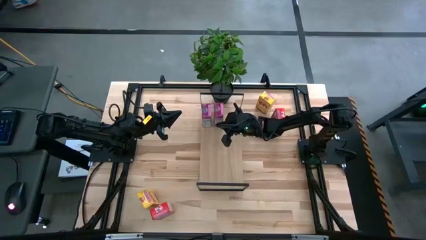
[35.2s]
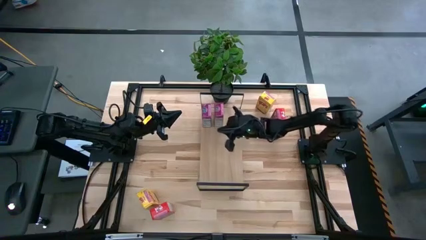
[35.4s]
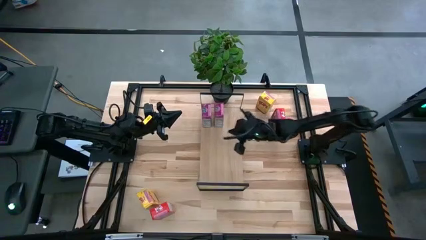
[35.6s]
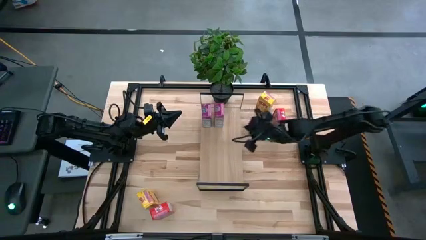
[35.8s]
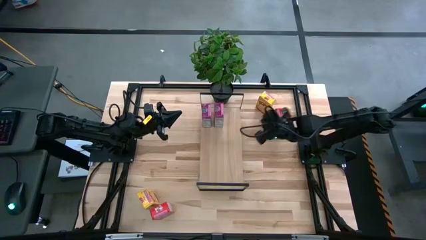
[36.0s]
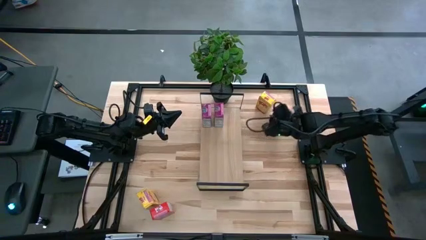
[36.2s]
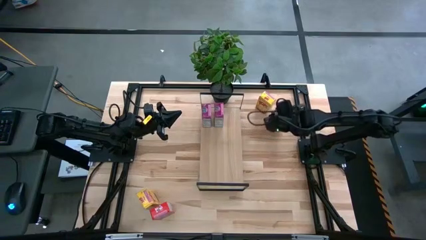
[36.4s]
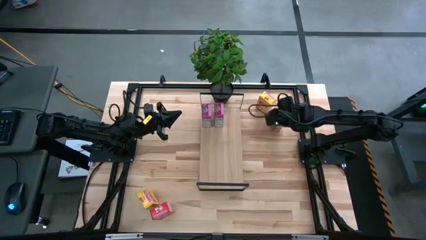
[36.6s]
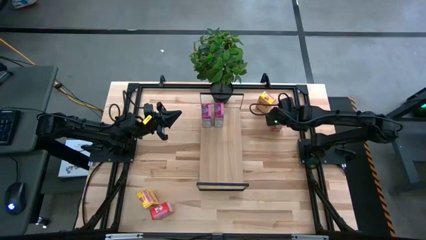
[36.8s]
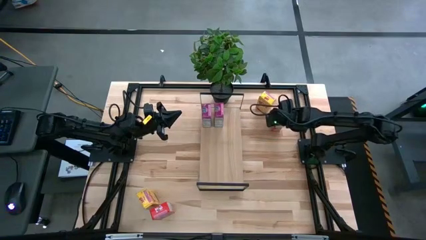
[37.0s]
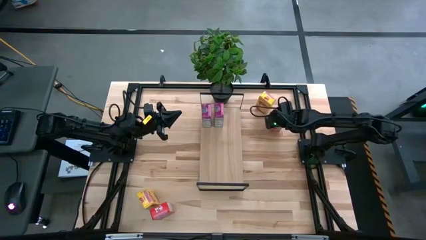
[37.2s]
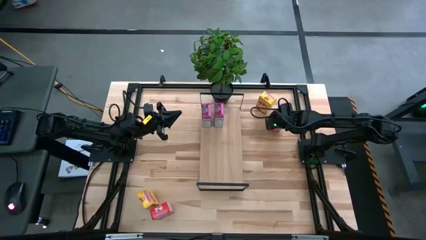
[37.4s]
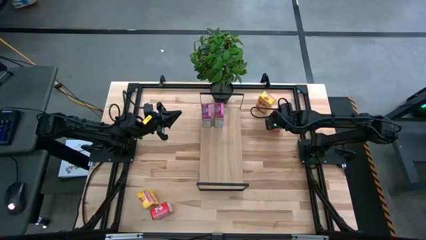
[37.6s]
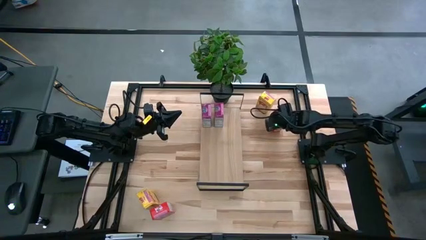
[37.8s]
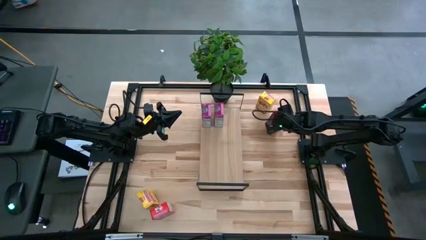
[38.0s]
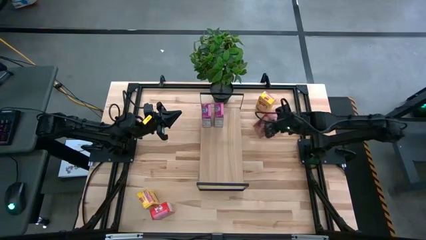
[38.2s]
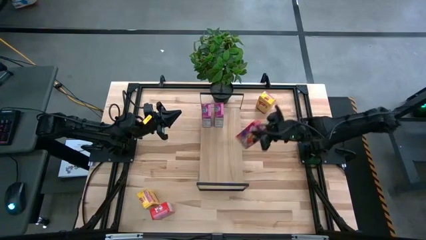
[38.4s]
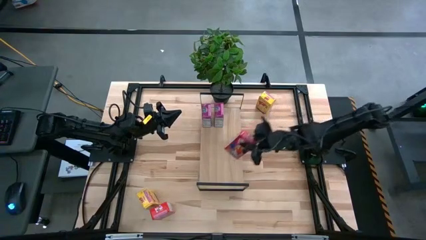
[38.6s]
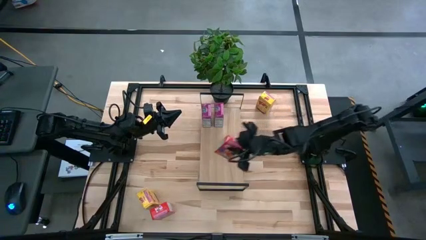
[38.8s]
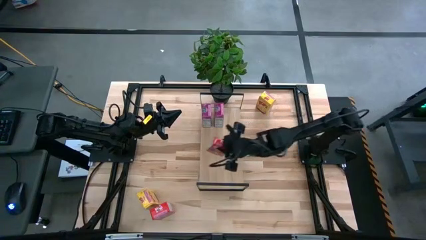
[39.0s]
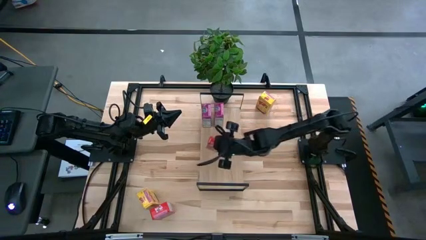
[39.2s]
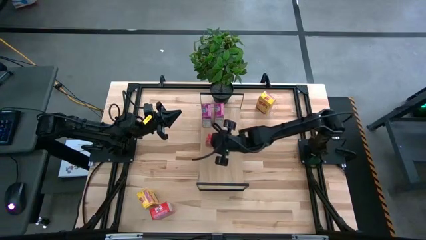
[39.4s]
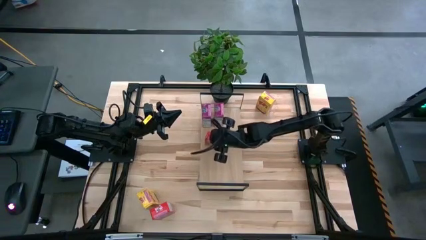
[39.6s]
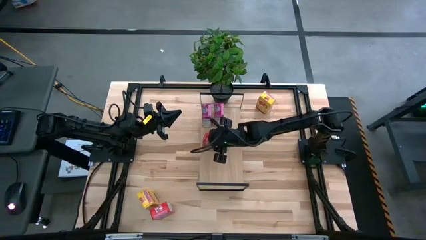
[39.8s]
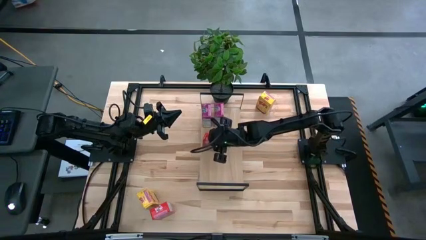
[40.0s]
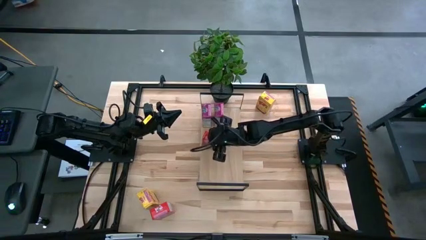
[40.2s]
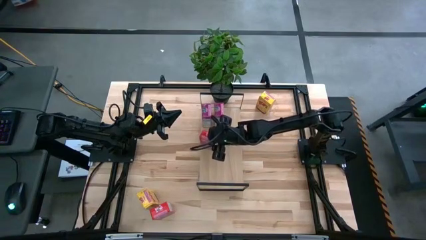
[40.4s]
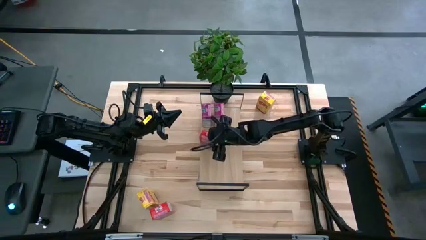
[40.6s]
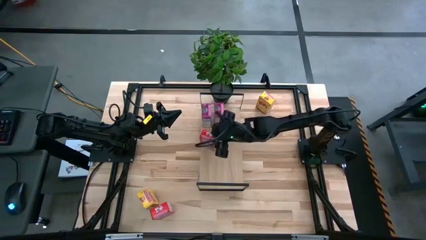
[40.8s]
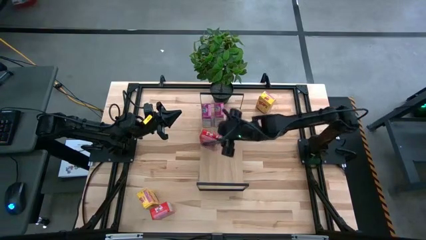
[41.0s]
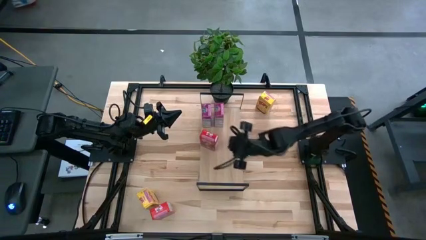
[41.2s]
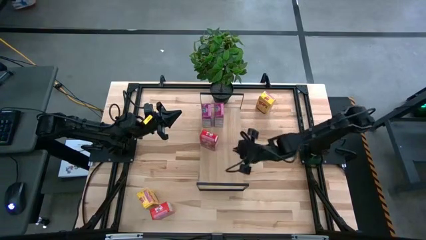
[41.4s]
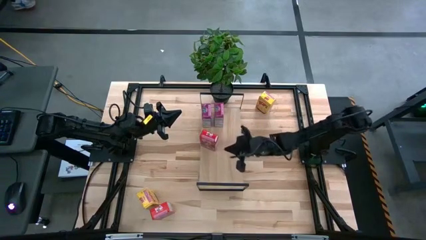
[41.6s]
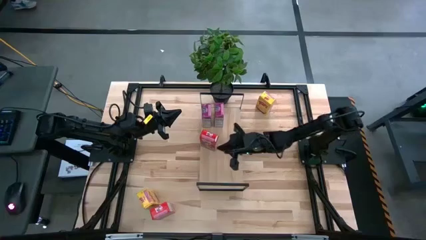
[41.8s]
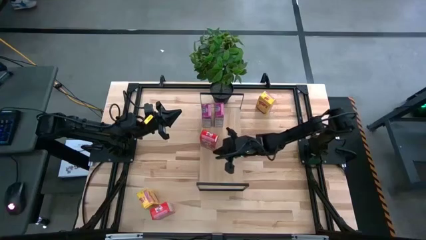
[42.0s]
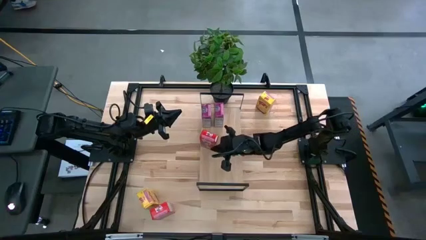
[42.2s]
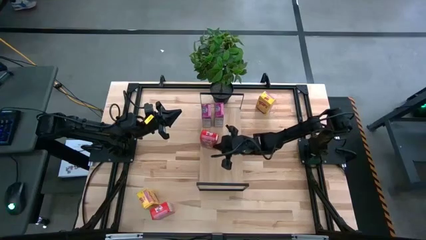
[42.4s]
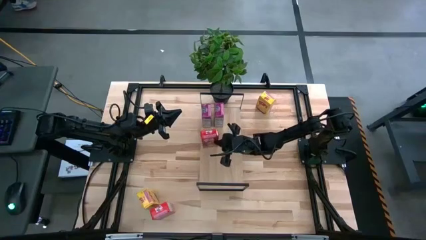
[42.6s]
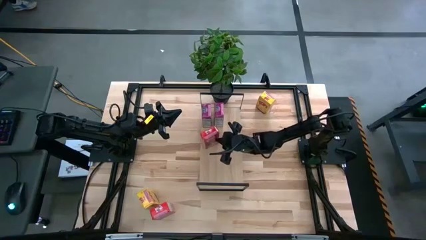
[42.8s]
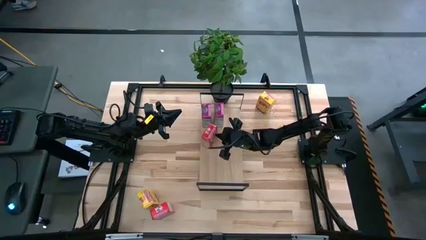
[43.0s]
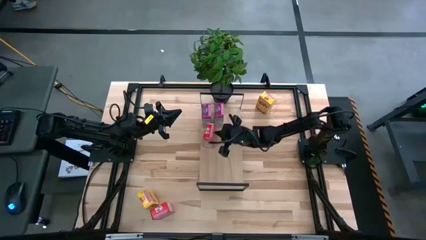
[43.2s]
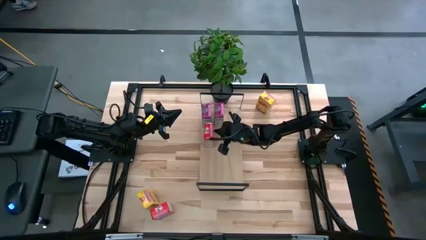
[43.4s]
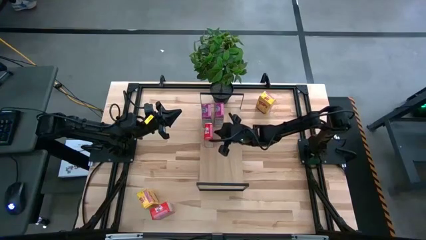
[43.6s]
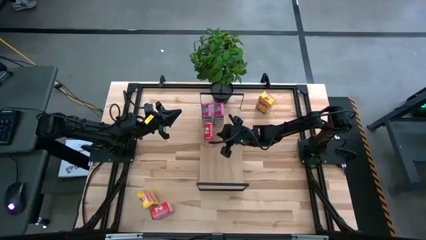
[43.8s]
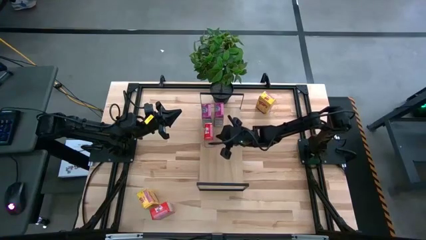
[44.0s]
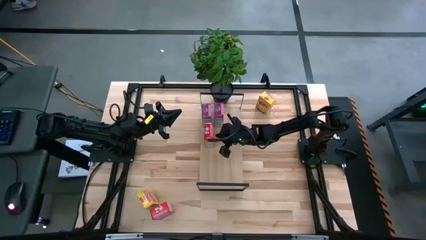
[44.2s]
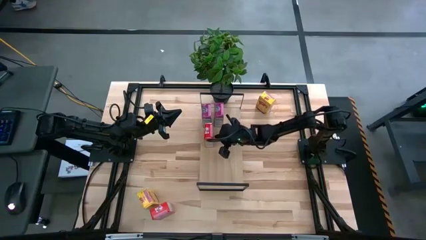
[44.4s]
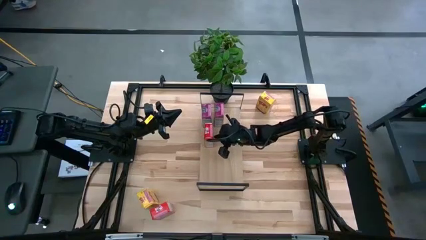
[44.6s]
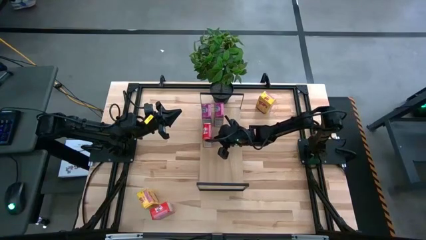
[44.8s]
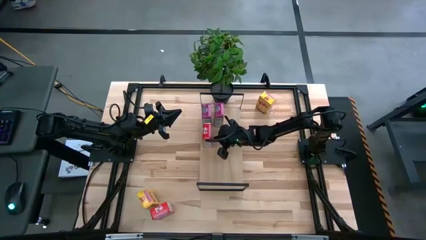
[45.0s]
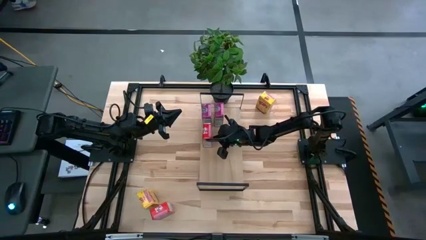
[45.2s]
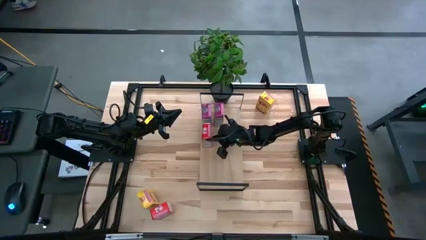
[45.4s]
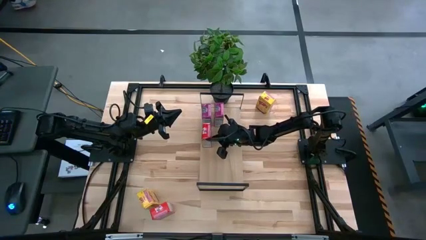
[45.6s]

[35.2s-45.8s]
Task: Stack cereal on shelf
Put the right red cereal box on the shelf

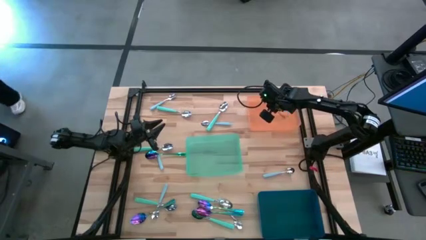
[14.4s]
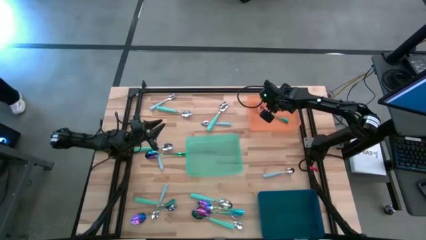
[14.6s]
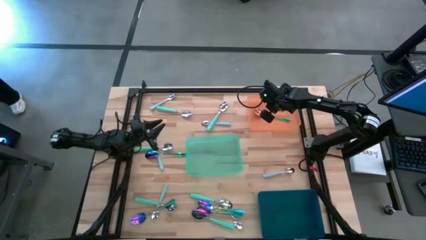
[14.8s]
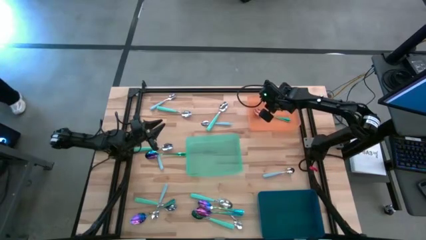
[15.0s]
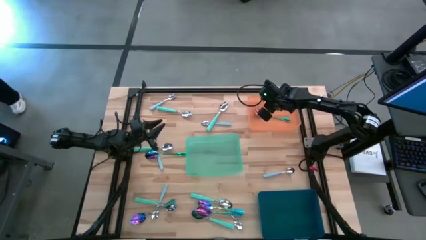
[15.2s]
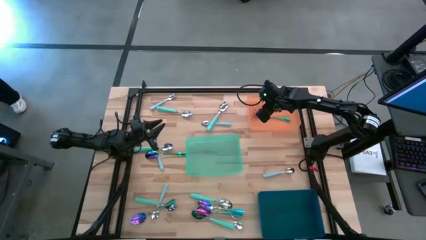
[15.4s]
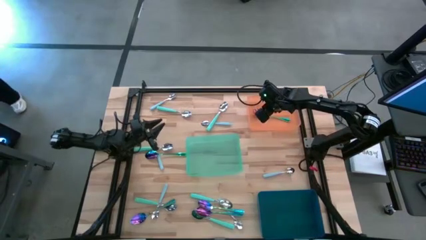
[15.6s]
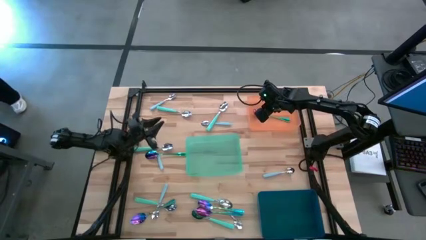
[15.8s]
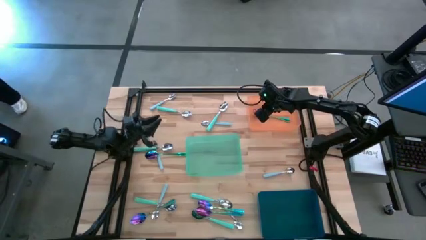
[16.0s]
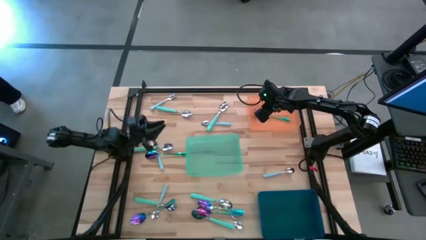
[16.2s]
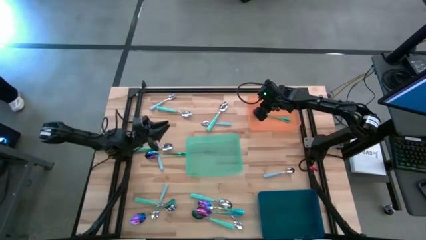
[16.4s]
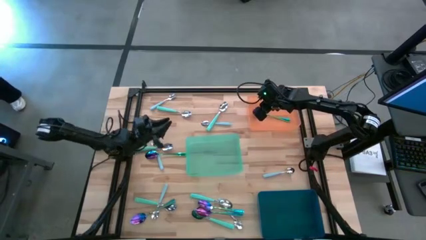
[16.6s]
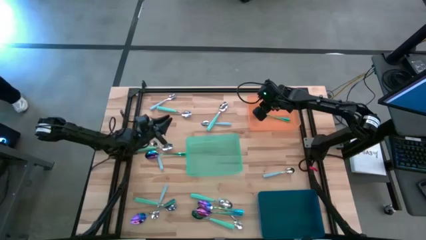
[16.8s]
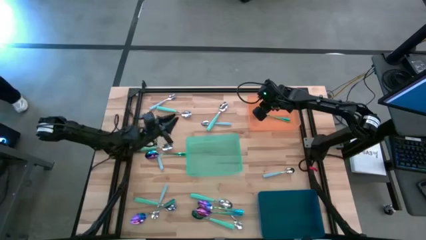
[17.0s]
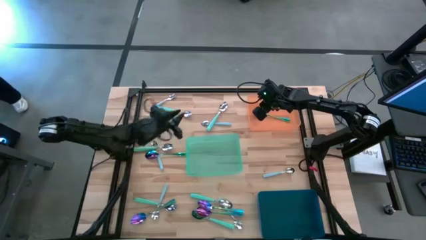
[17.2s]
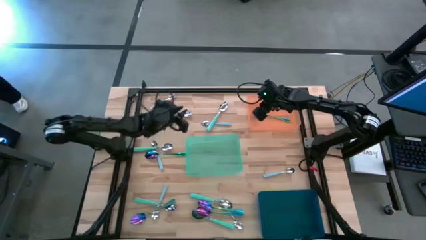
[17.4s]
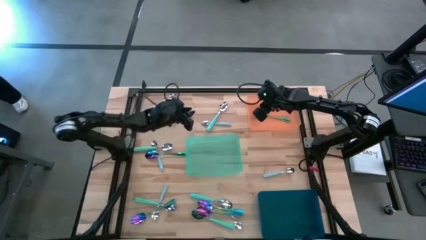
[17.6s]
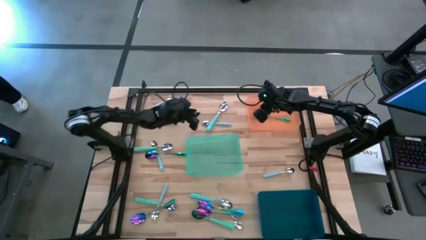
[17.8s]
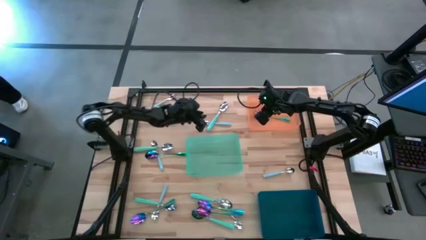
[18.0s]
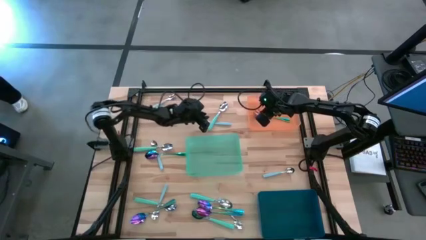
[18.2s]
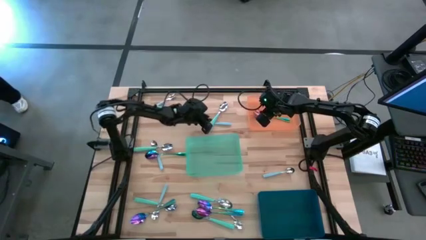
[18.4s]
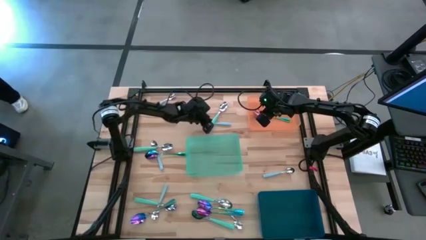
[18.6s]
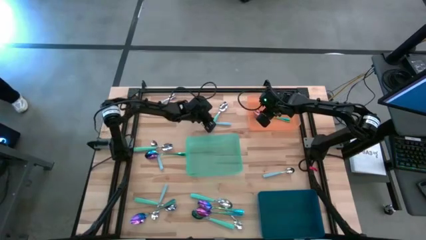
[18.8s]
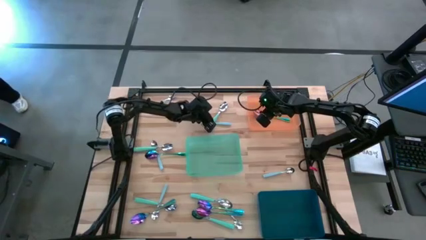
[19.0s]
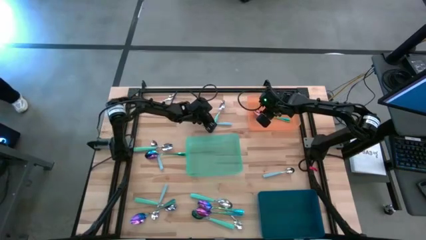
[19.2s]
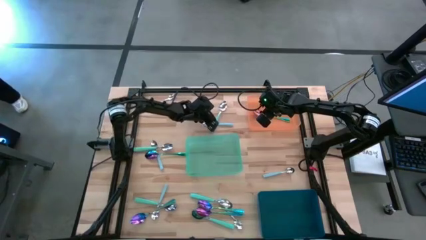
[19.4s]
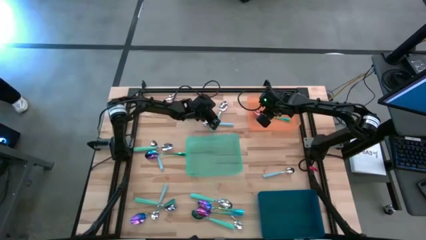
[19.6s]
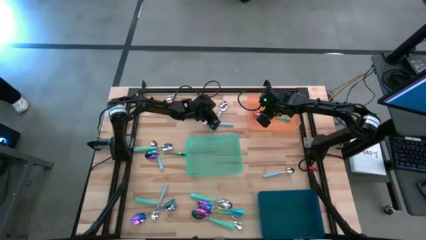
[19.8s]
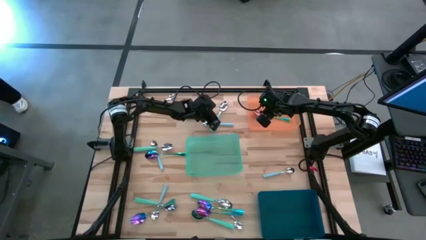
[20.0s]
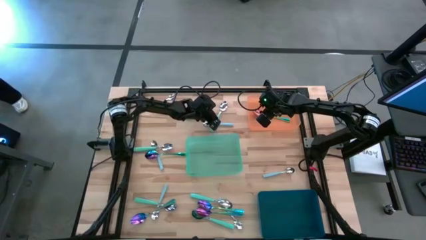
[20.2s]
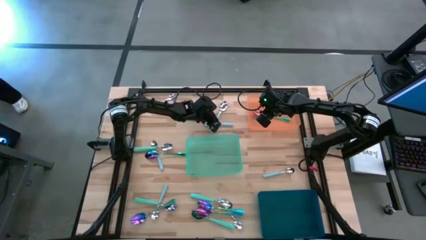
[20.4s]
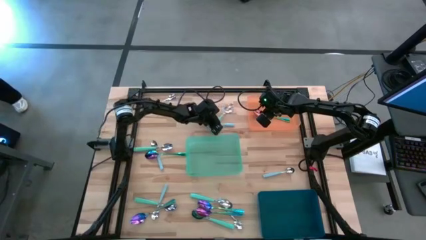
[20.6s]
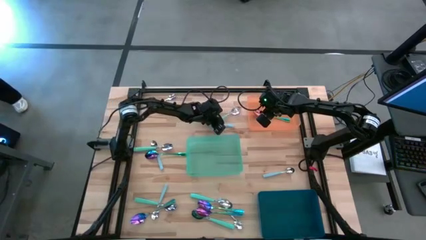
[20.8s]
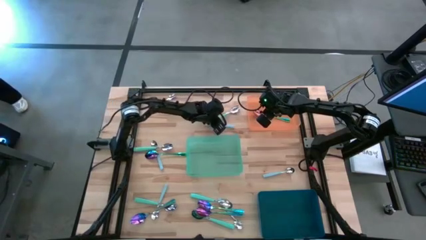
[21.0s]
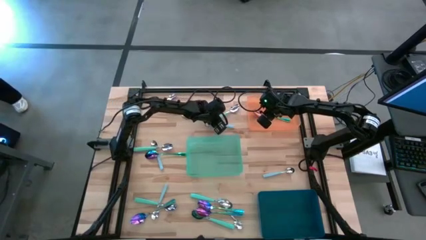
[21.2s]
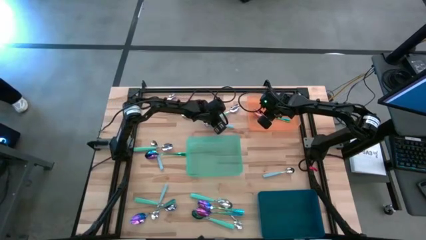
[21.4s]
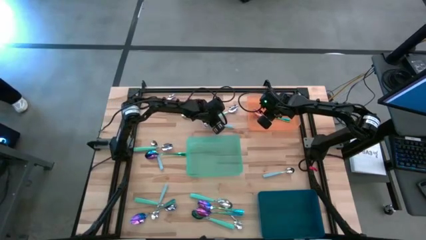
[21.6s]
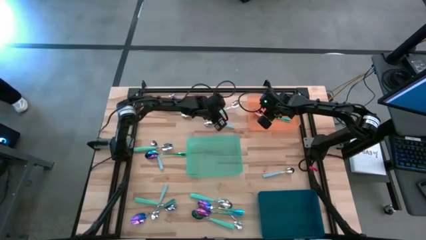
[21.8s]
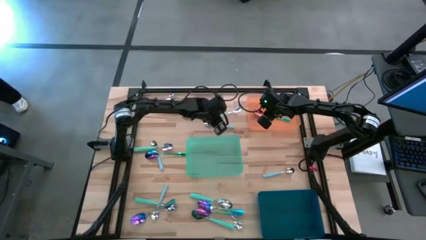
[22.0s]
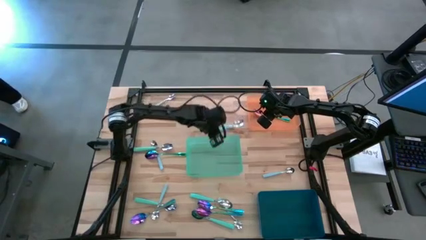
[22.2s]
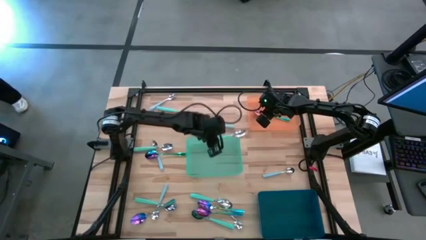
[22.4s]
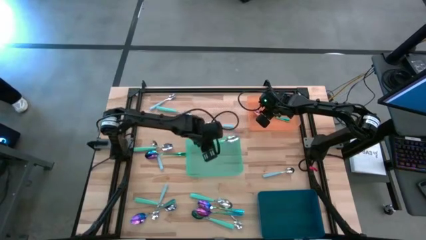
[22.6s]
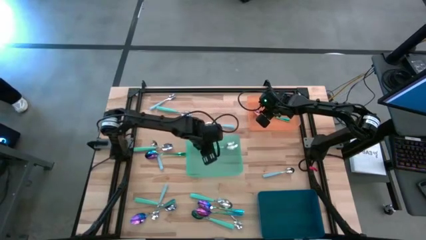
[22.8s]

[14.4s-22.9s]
Task: Sort silverware by color (type)
Put the green spoon into the green bin
